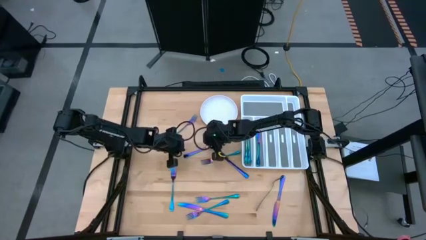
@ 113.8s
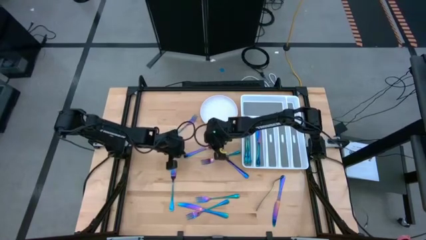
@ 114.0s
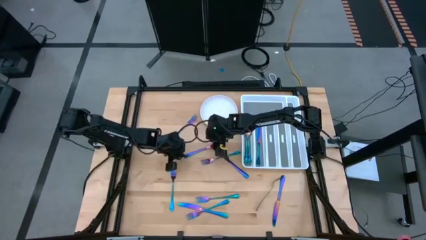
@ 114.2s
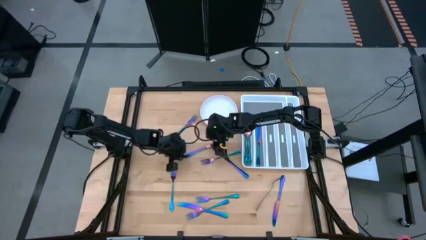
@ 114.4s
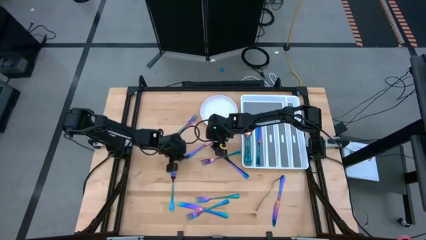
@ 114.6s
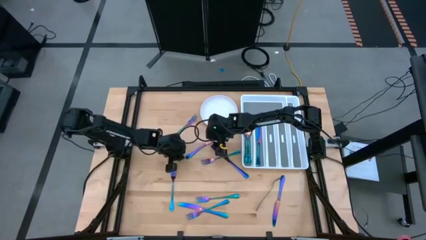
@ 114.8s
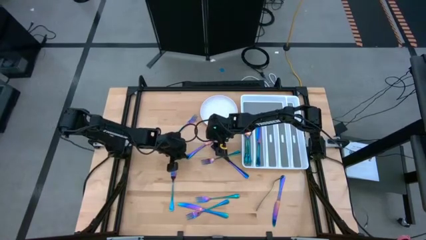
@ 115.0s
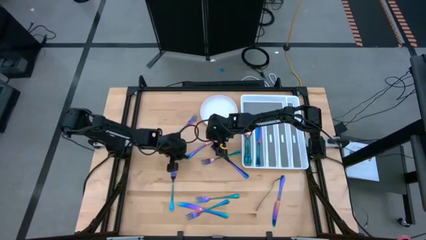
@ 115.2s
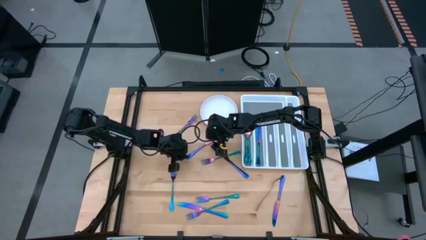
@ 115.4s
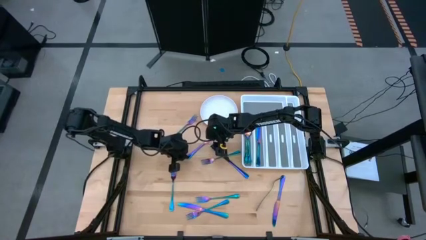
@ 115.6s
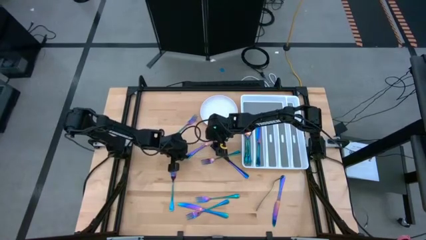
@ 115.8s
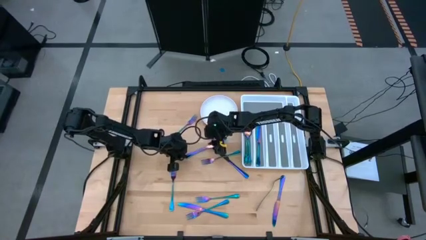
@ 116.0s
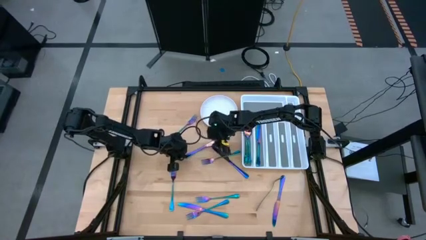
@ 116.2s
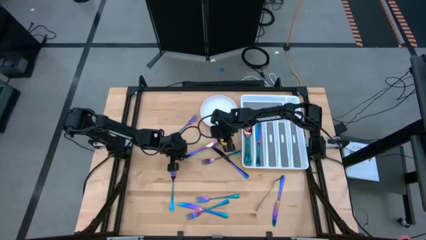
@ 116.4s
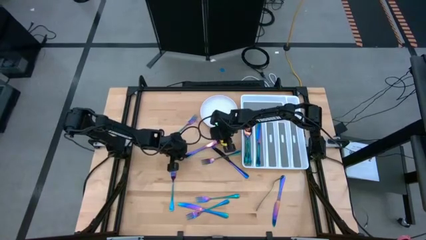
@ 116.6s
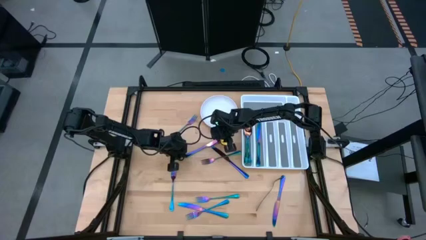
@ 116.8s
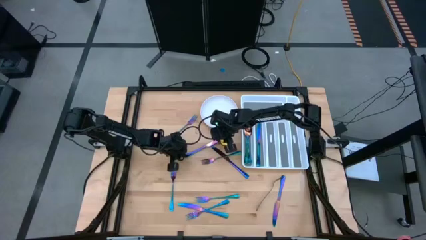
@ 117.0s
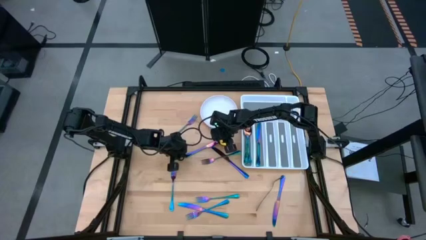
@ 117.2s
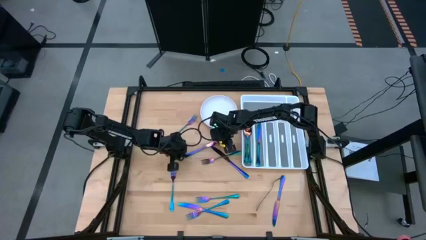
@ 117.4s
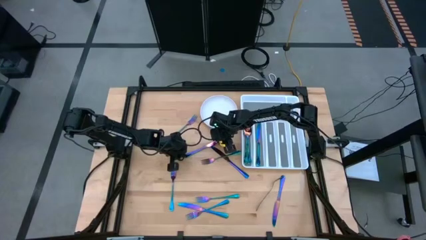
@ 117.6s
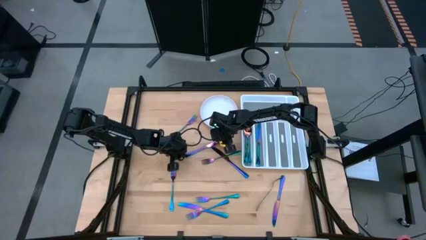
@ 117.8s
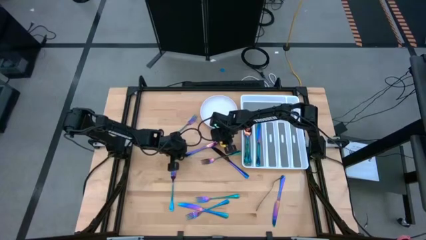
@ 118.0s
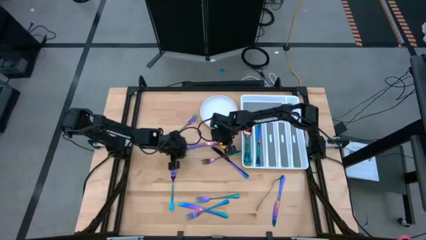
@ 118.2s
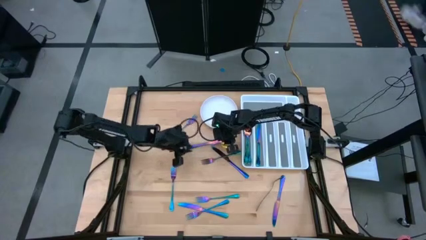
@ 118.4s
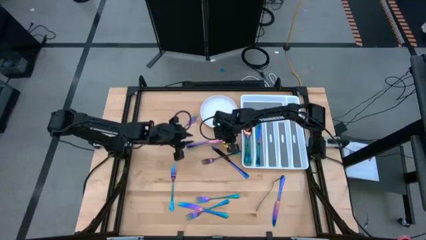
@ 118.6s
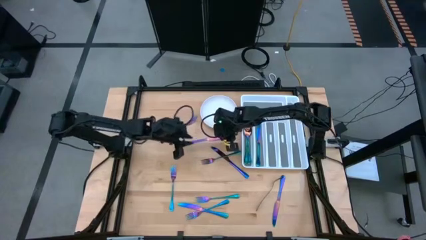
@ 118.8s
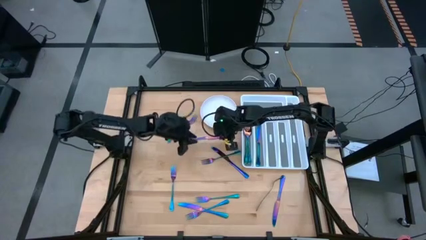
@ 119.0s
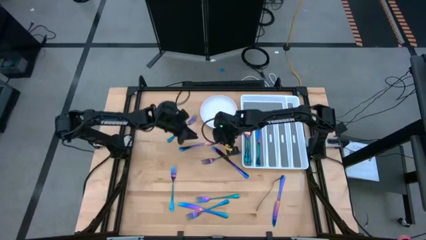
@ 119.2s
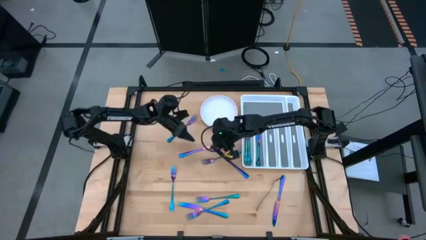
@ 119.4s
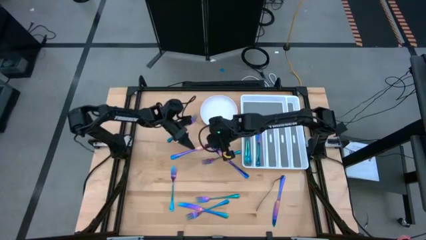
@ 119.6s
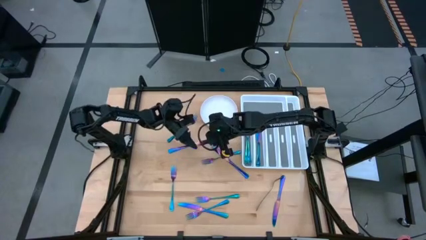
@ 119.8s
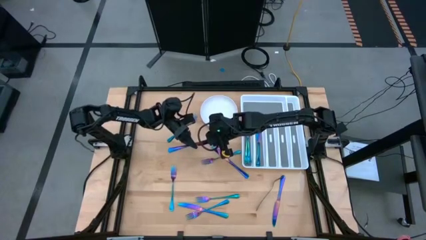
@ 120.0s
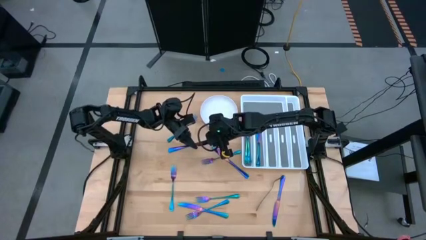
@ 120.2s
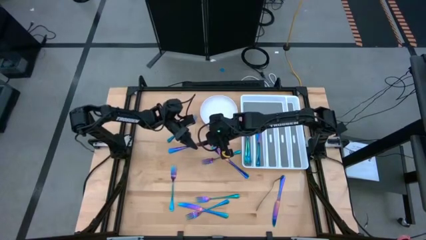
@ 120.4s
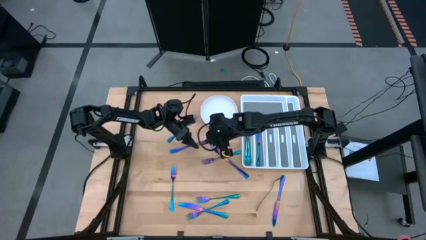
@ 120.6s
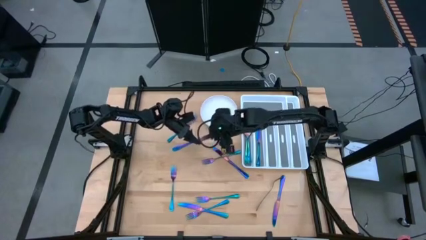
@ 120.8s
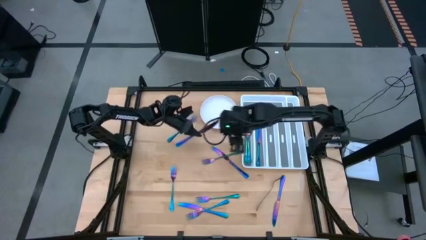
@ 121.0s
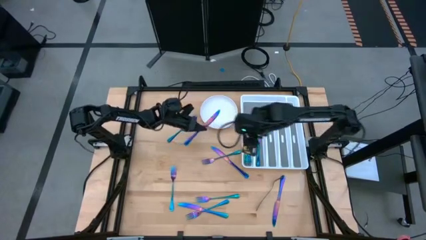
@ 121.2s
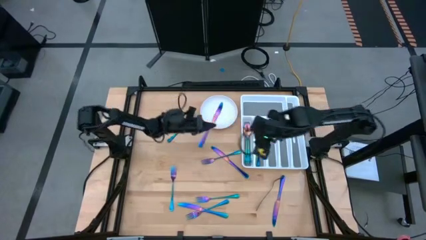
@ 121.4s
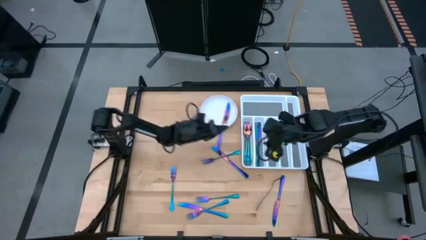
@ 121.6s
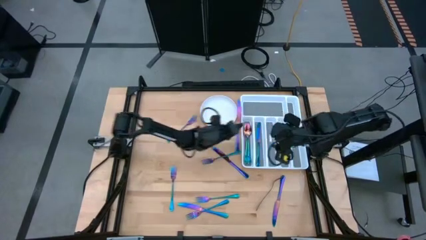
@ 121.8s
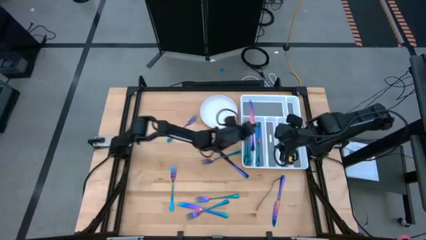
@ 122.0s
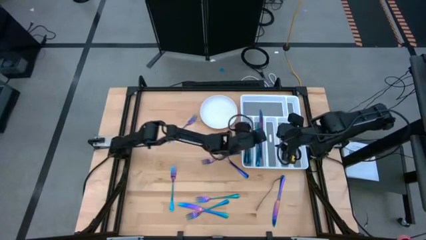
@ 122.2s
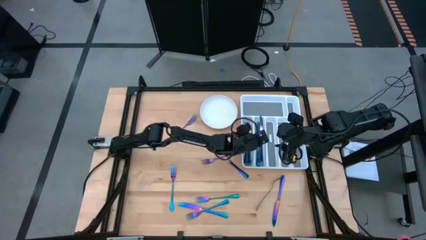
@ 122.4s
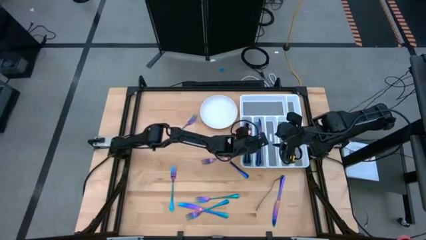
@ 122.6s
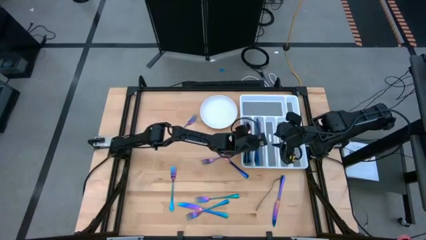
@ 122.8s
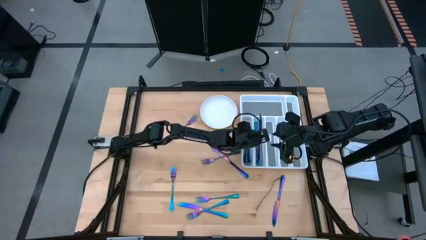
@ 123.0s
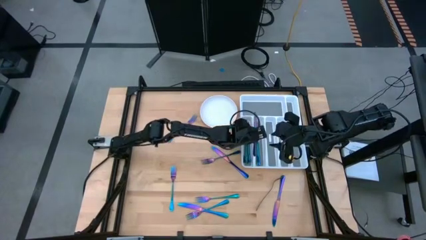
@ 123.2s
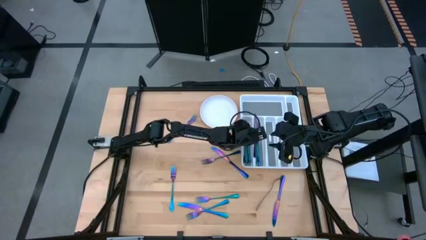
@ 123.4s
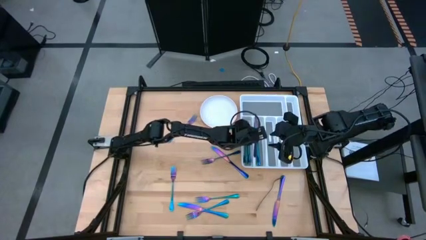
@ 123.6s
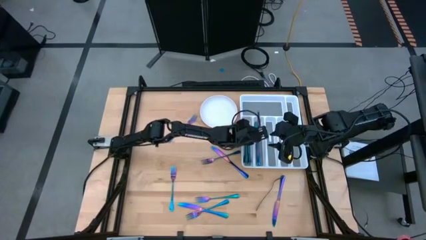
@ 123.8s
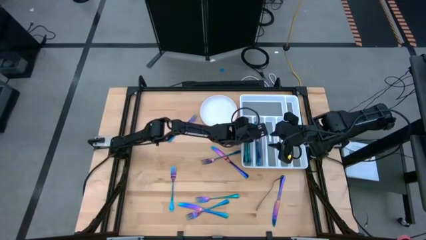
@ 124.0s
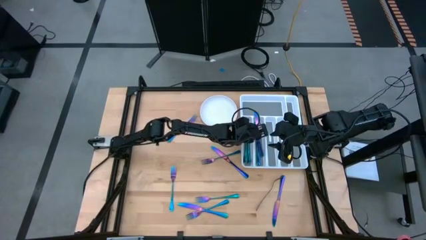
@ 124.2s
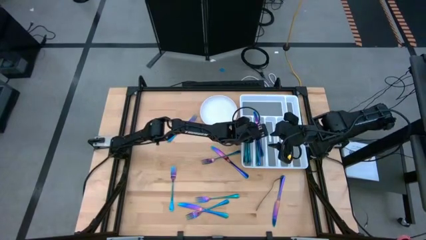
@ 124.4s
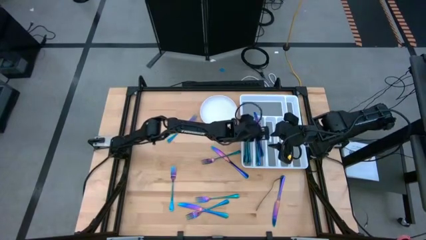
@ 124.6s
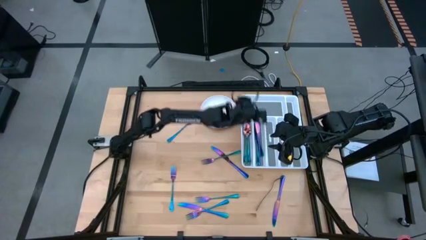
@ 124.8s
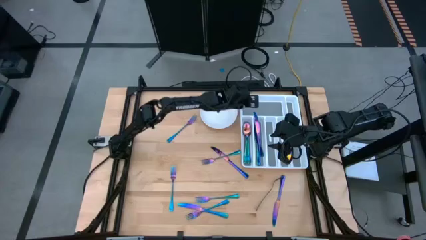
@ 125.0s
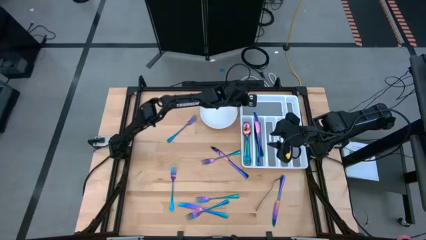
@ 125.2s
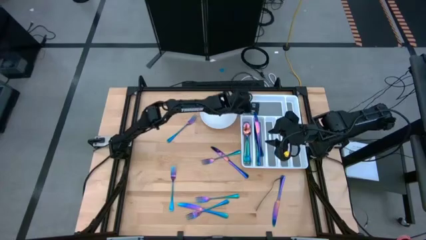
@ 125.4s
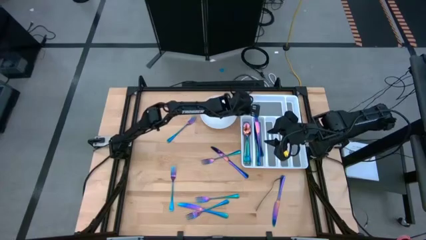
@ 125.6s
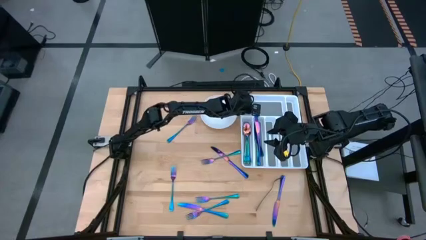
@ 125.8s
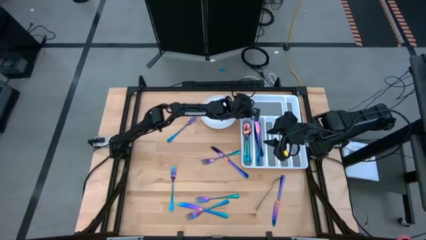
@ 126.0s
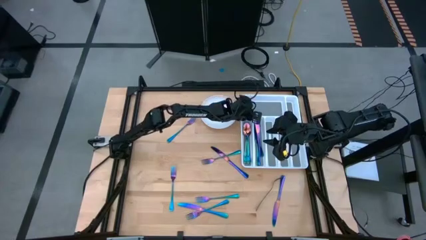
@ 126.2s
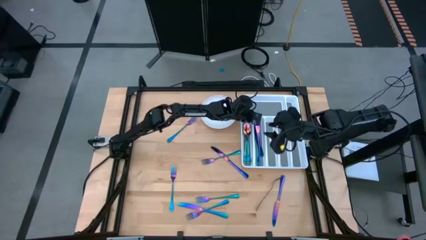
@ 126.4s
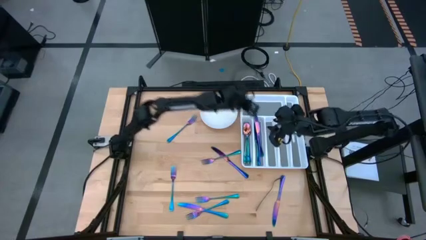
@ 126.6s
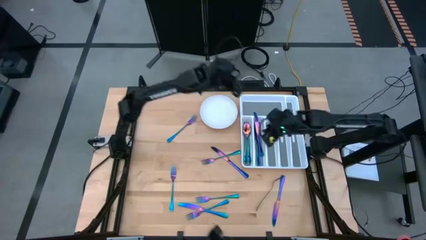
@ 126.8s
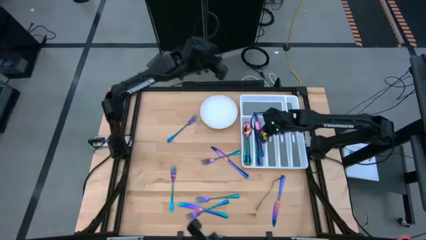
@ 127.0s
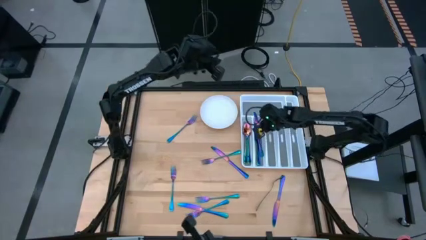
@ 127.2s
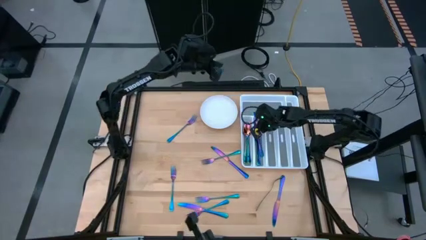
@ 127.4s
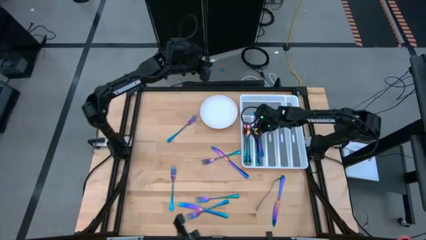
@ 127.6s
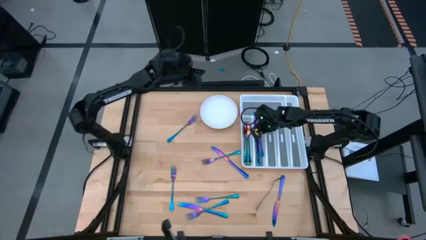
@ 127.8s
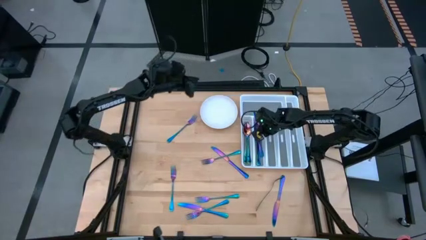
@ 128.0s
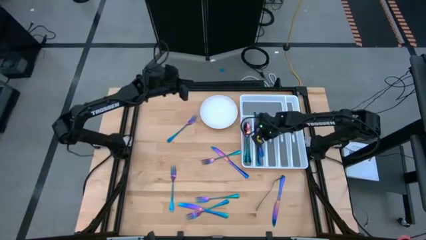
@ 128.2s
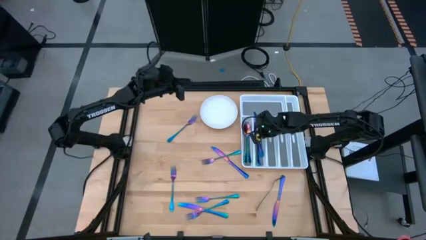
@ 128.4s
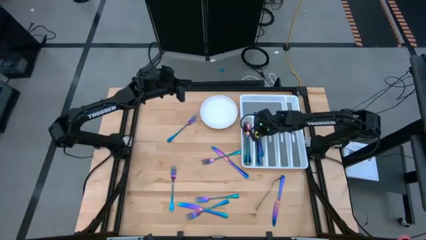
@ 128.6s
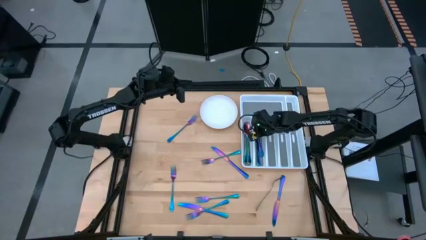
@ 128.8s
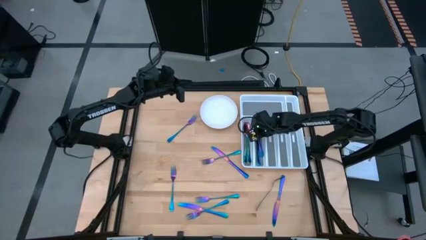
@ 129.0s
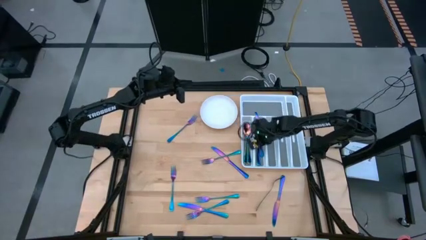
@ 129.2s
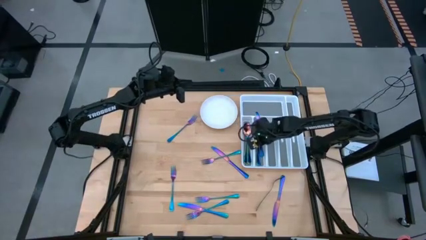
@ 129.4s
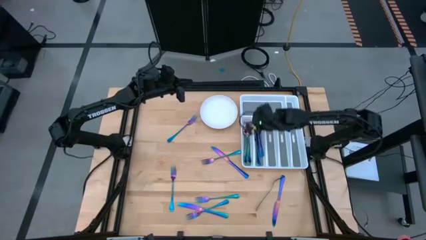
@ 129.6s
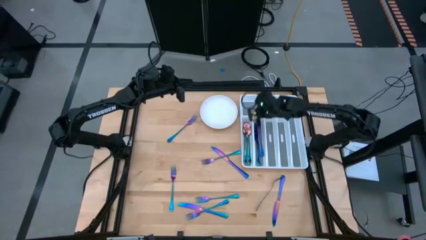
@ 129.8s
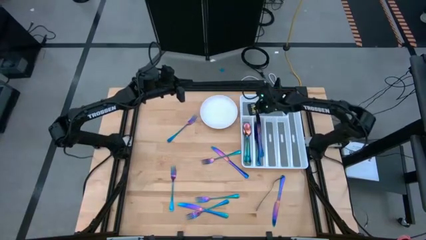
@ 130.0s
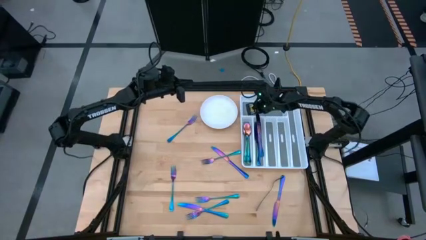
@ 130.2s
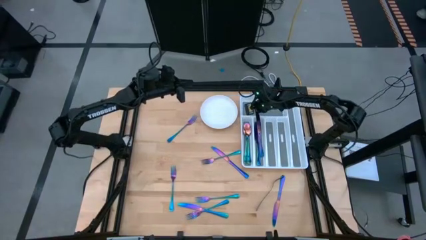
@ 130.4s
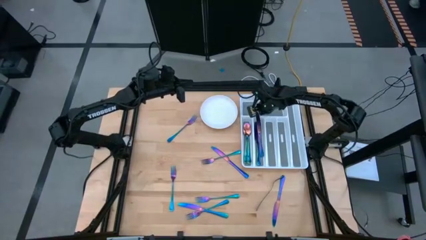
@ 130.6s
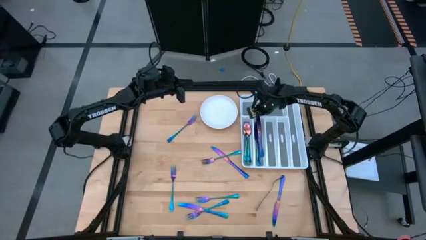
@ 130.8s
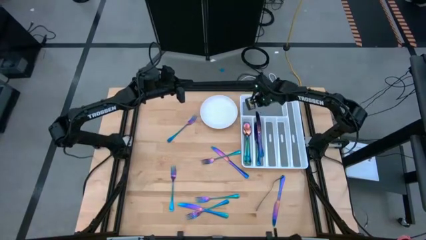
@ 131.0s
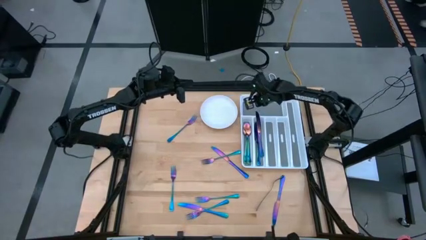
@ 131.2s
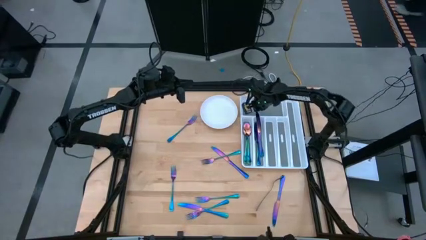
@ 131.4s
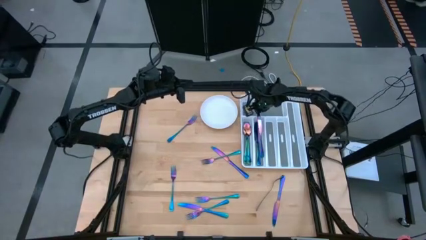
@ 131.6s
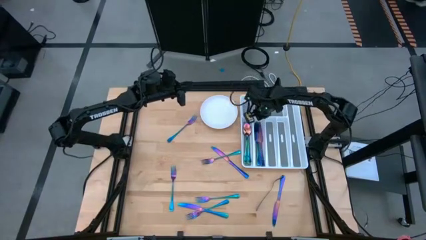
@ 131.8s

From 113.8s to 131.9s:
Task: Sort silverware
Put the purple table knife into the white silverware tray
